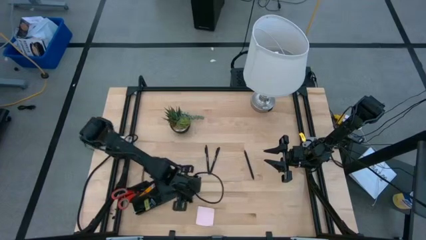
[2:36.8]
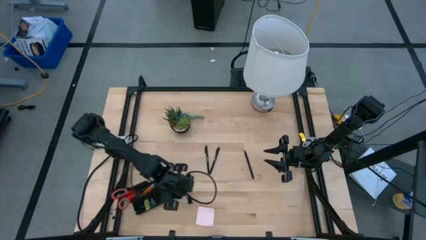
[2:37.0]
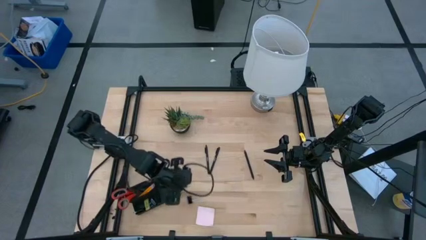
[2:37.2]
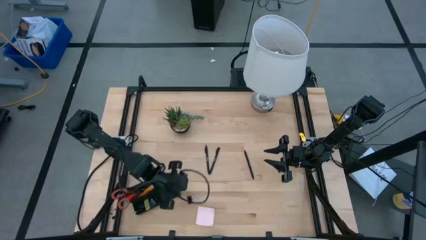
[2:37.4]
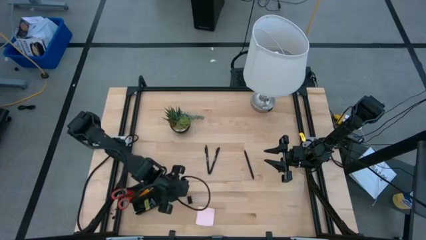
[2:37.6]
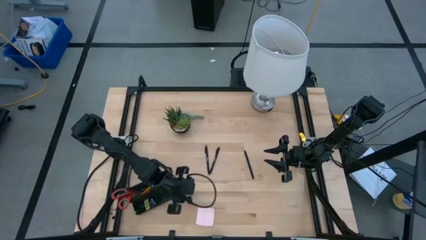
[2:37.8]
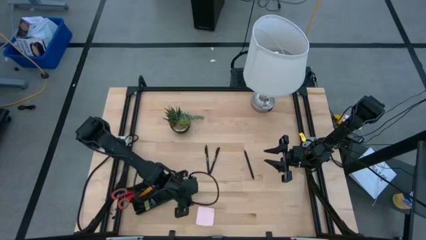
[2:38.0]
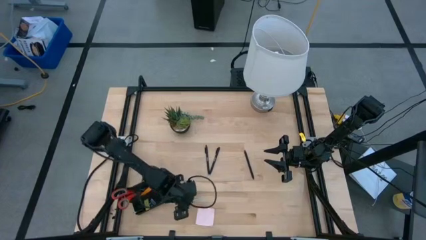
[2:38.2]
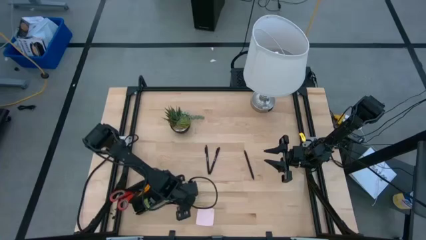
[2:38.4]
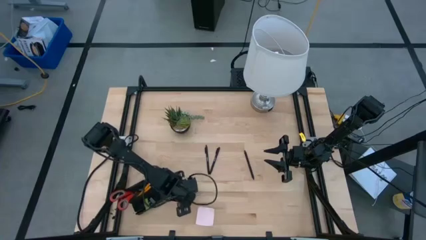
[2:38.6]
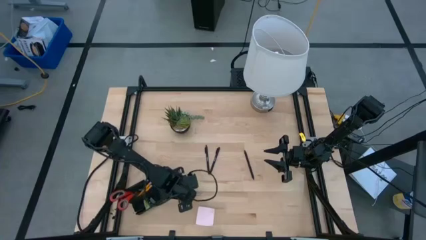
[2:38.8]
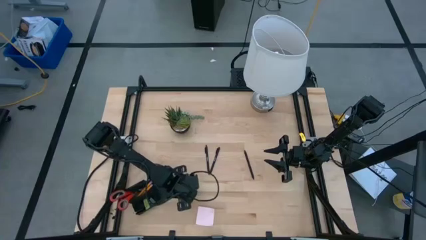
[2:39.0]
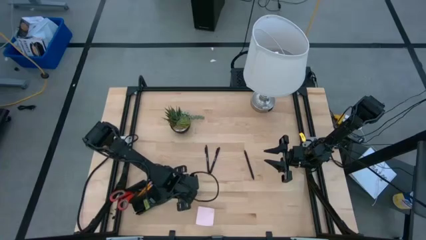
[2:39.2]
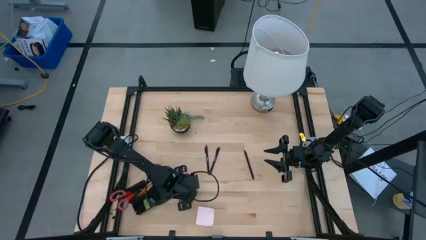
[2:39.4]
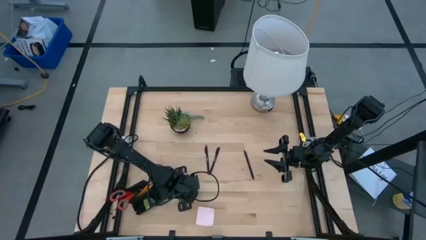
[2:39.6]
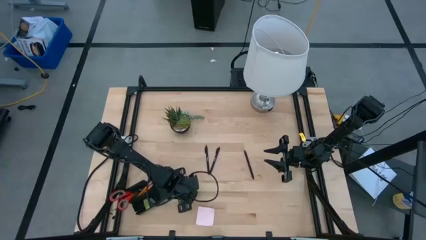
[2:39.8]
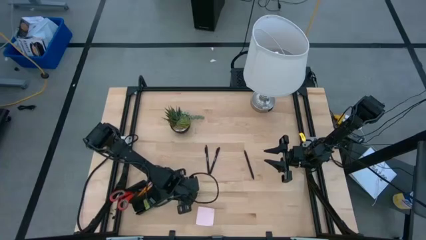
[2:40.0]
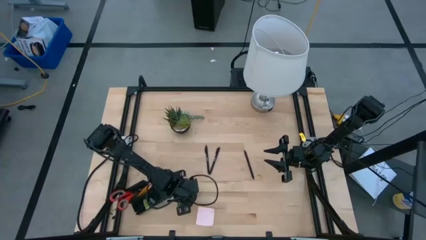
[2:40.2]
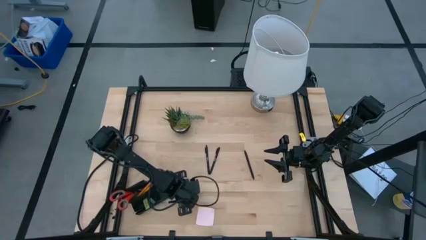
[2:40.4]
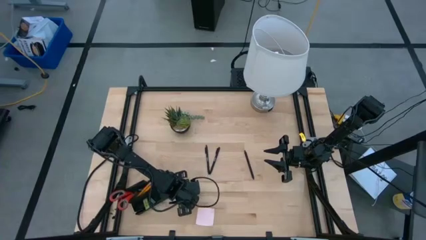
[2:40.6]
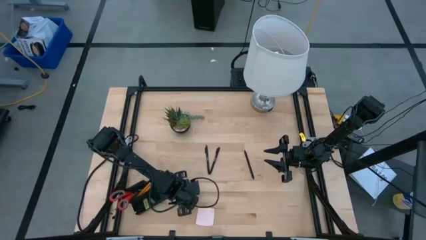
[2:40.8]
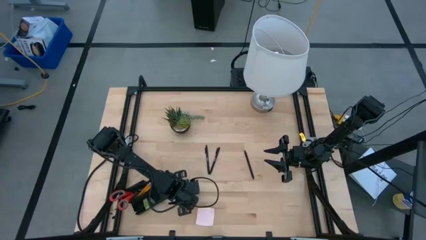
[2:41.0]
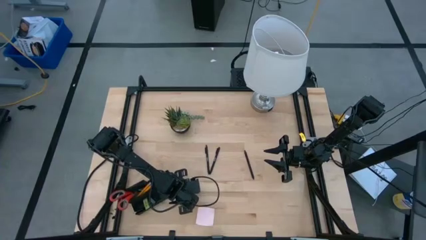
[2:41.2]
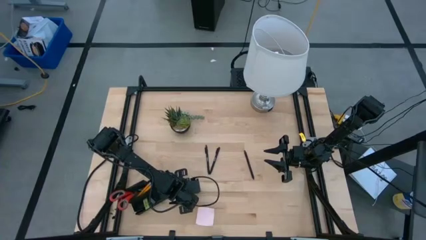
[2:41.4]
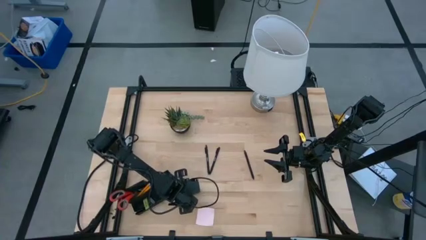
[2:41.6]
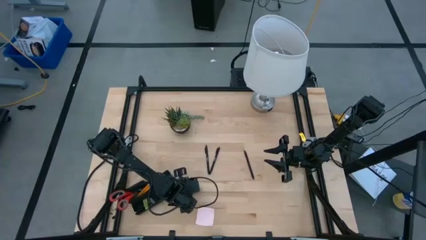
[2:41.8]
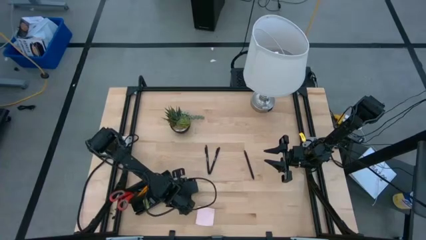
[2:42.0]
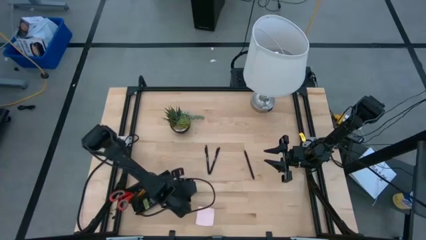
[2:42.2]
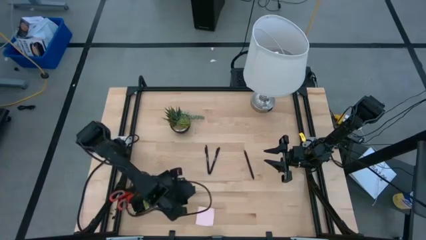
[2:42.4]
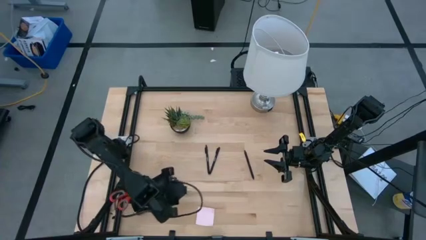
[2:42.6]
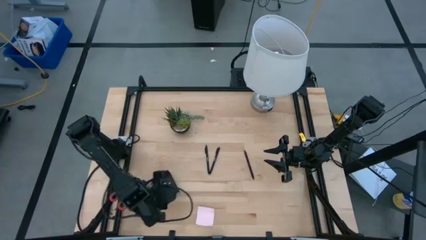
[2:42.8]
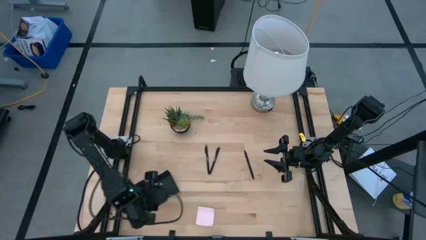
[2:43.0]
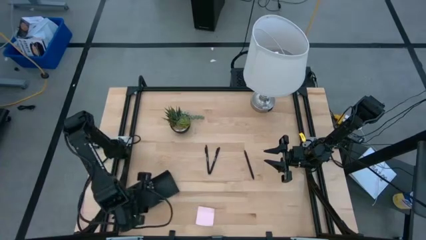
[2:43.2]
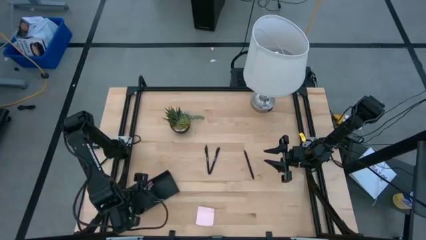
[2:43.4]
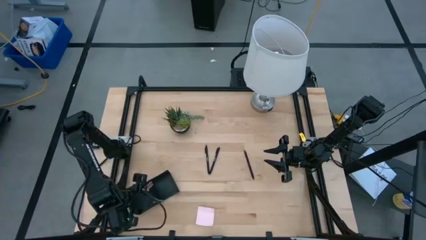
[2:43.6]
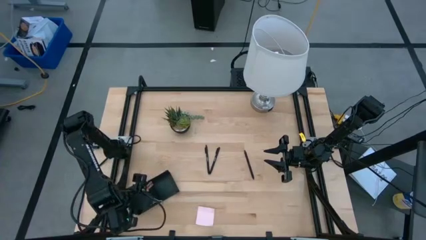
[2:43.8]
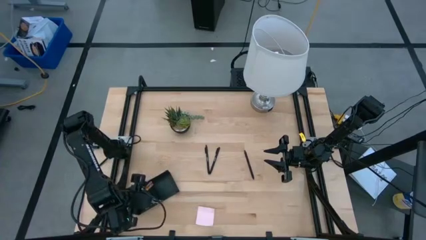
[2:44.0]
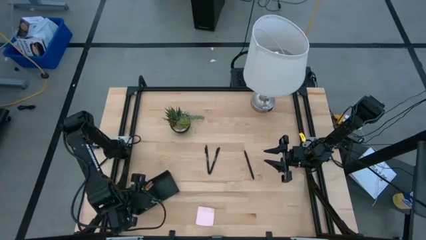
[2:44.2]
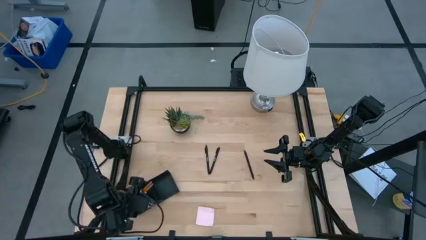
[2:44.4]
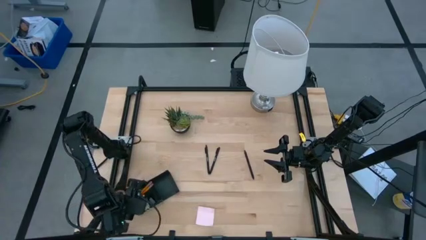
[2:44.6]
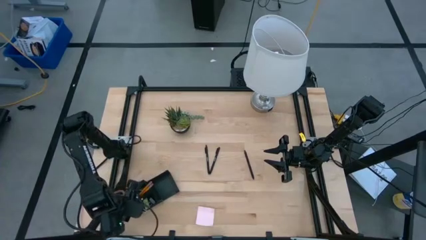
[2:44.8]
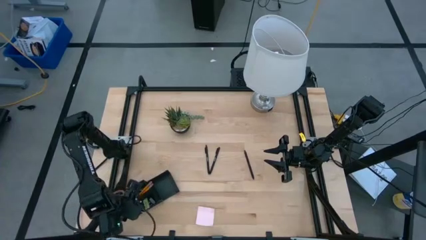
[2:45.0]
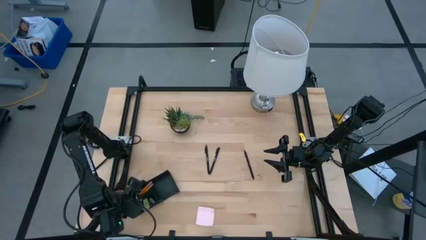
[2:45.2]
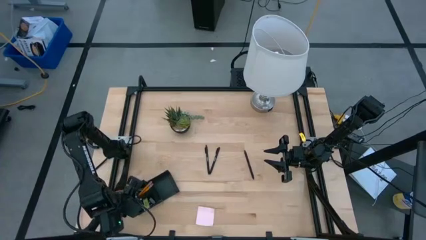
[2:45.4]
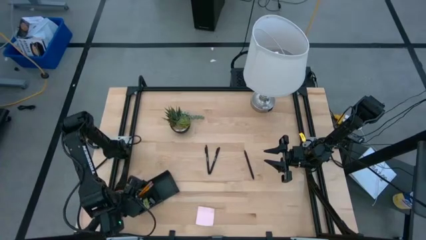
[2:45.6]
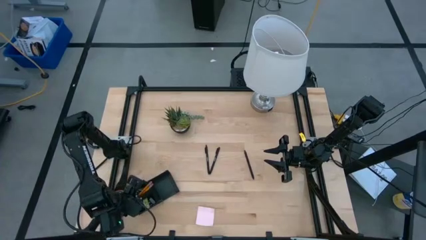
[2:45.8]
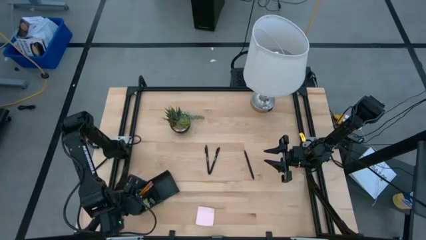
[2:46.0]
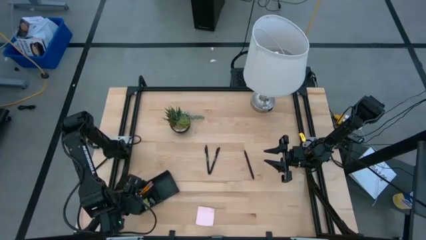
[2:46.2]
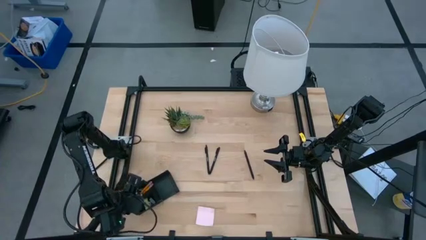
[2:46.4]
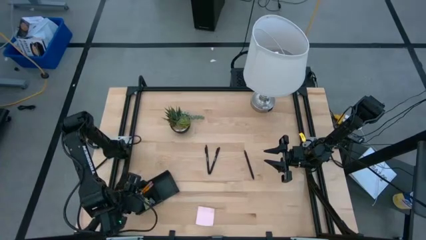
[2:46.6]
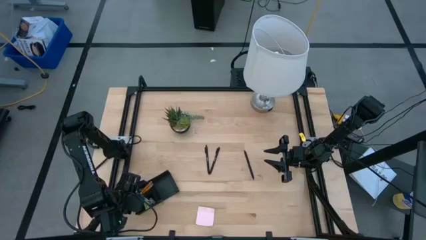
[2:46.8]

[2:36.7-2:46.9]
Task: Pick and place office supplies into organizer
Put the binder clip into the bottom left section of the desk organizer

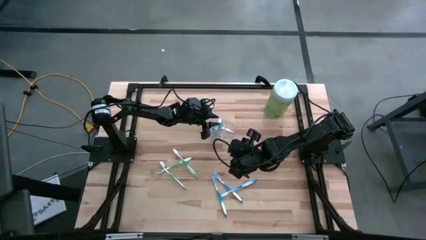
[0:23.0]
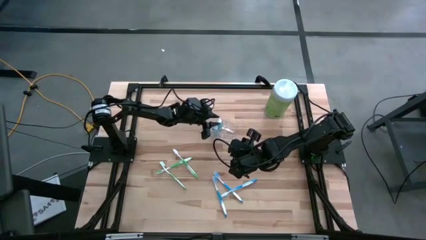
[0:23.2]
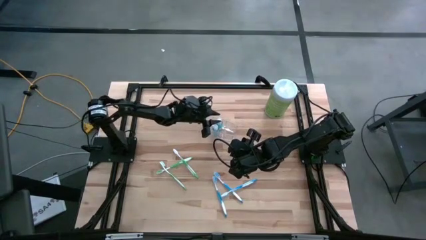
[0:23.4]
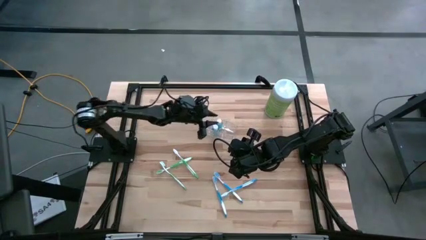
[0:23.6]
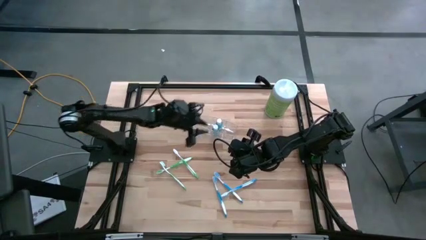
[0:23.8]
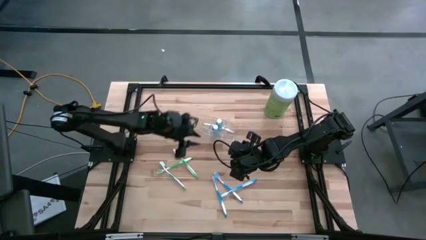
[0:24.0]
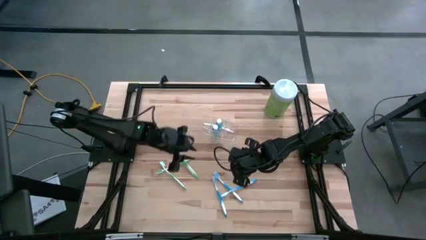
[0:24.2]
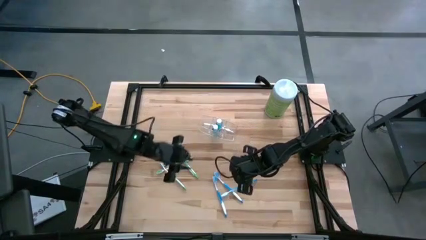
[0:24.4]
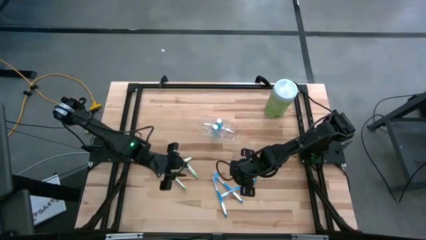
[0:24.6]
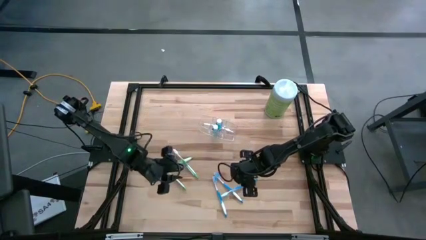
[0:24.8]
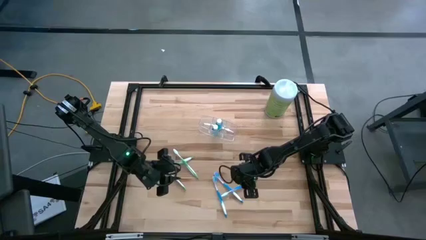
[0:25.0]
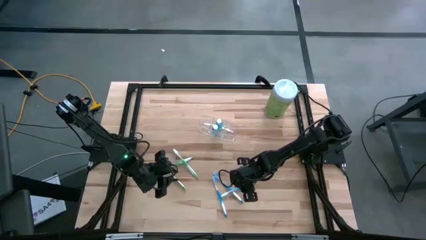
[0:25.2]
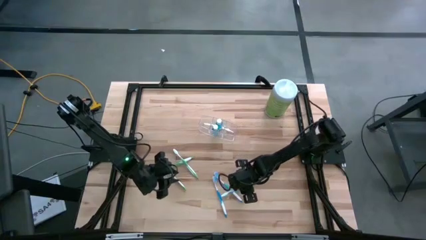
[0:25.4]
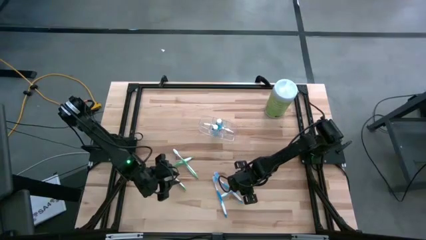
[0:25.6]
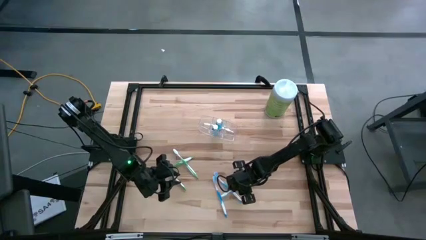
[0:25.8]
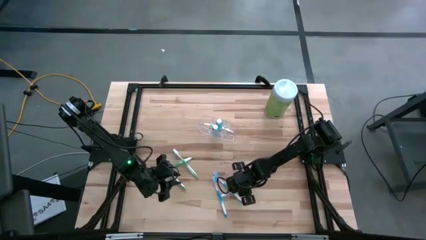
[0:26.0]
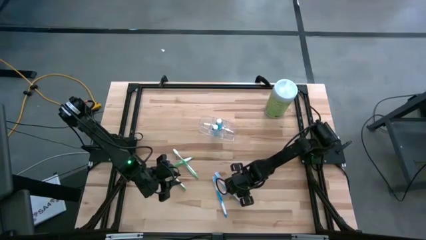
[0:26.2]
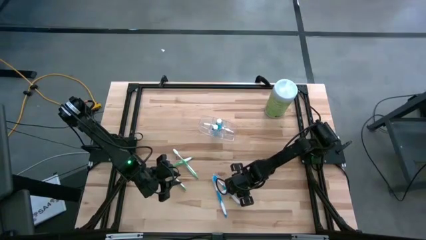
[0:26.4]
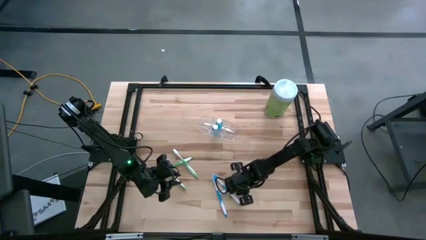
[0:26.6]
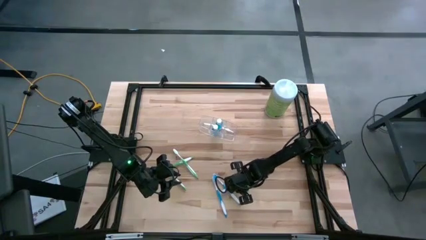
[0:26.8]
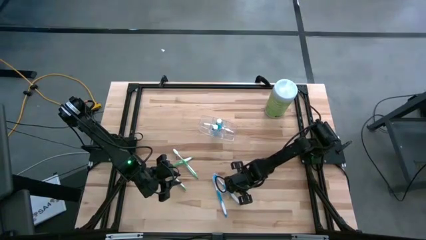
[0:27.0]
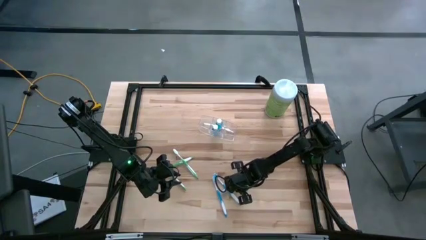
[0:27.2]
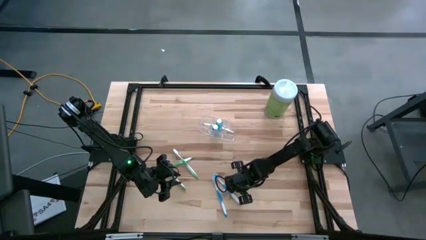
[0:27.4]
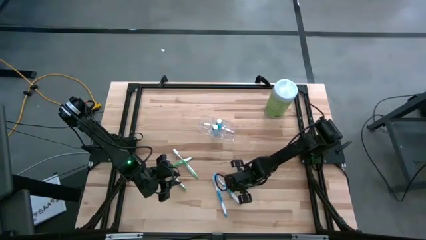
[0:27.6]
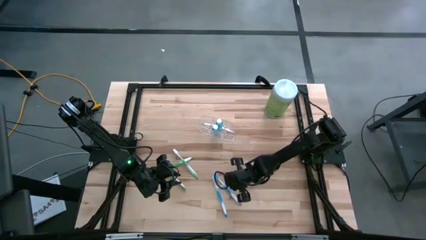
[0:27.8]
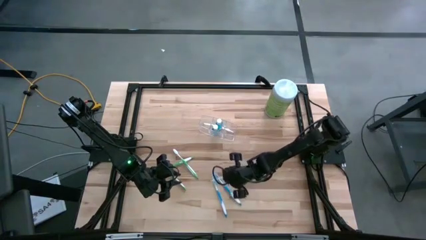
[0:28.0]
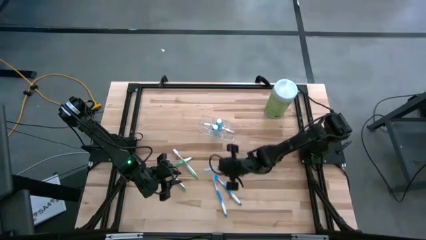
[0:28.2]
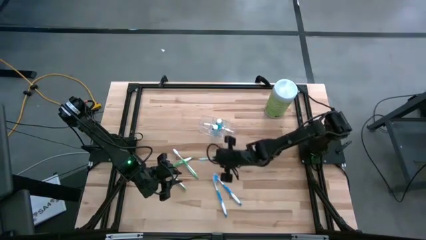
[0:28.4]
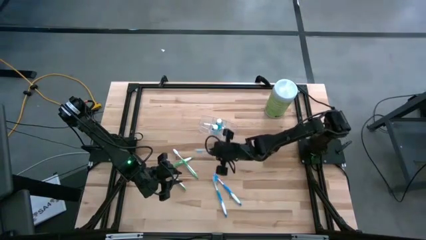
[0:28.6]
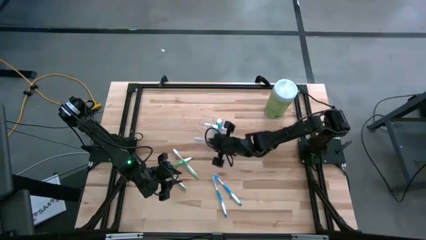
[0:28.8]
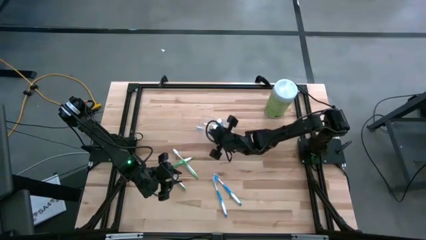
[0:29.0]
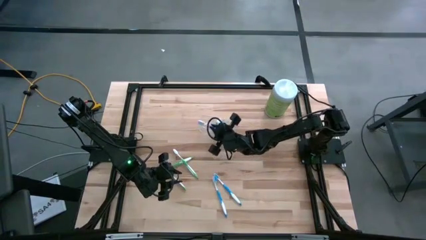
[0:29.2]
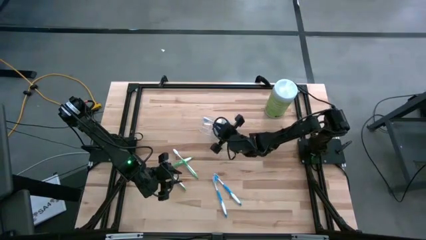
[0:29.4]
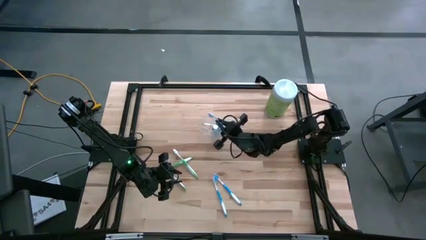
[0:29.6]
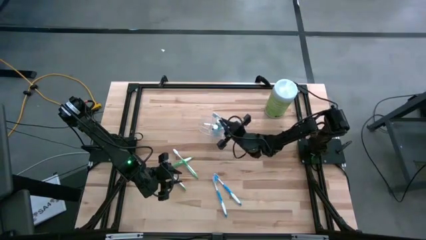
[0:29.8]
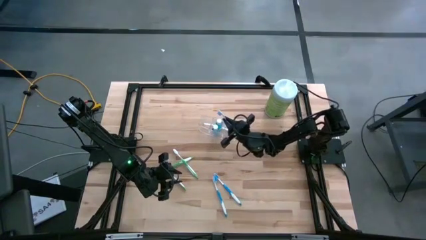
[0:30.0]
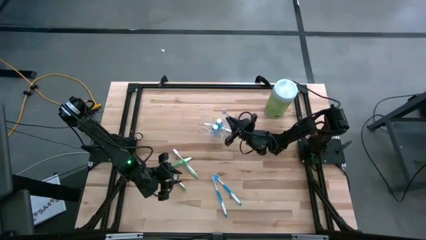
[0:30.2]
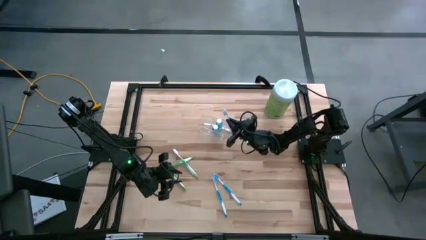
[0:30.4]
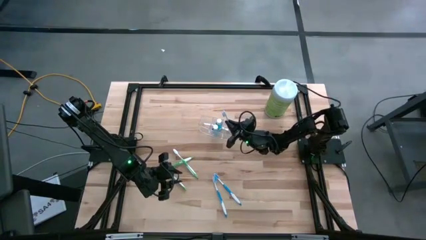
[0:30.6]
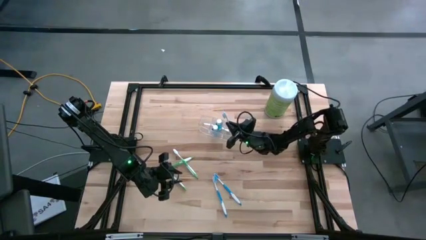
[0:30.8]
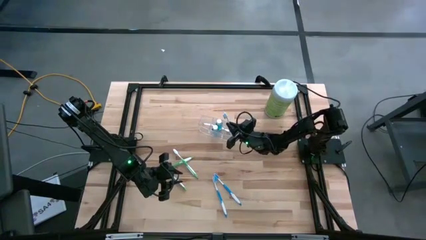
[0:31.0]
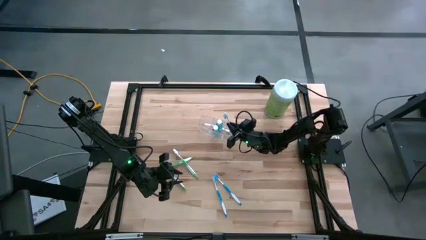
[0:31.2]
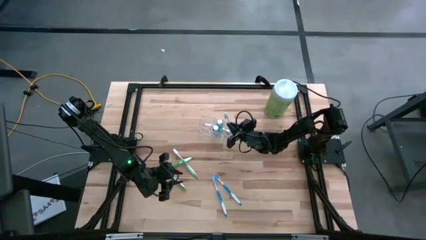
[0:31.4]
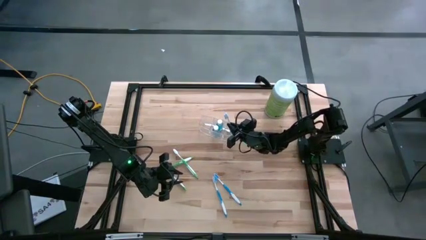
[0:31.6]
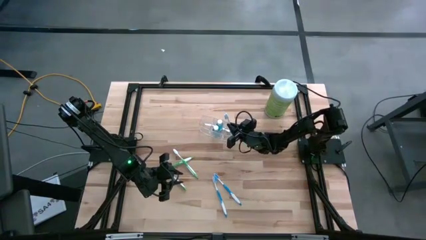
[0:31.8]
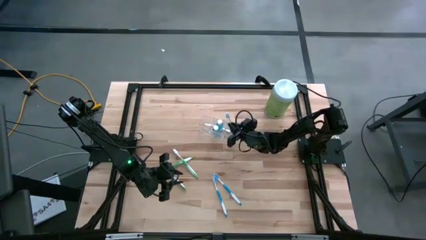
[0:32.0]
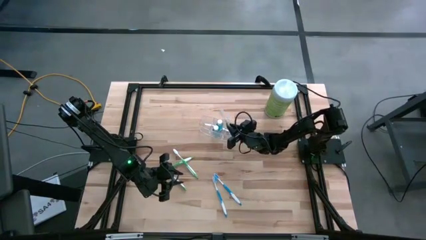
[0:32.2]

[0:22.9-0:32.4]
Task: Pick & Place toothbrushing station
Put the right blue toothbrush into the transparent organizer
